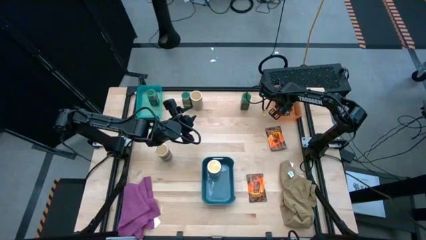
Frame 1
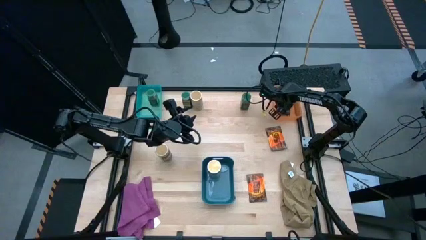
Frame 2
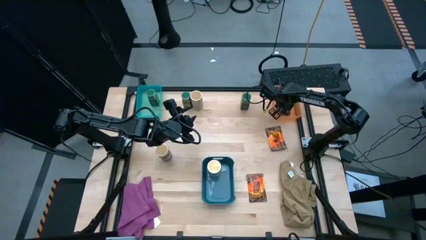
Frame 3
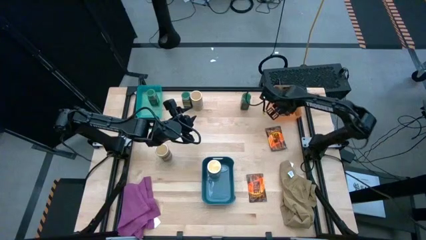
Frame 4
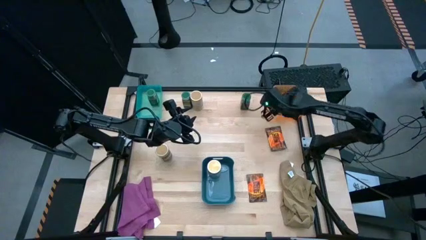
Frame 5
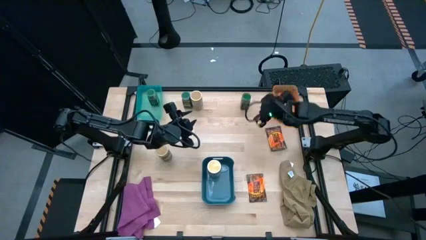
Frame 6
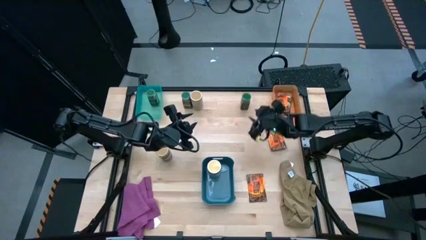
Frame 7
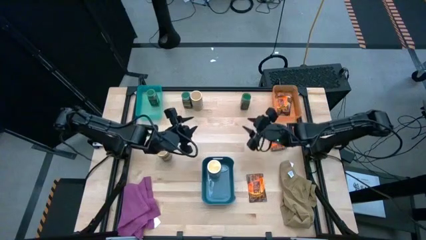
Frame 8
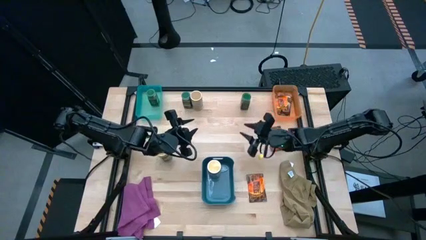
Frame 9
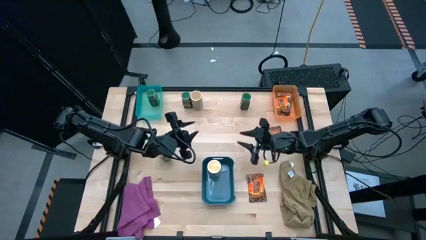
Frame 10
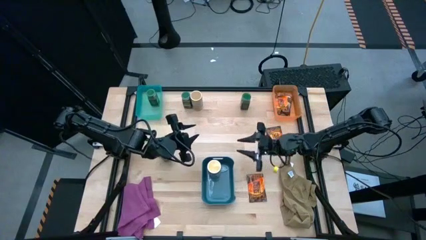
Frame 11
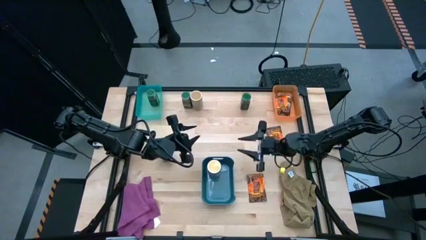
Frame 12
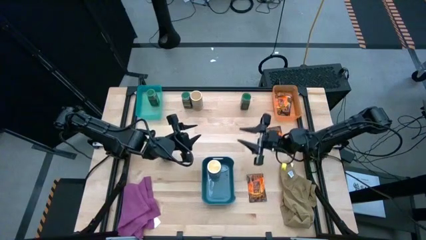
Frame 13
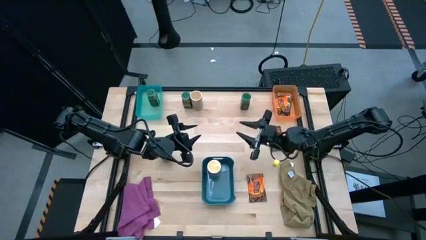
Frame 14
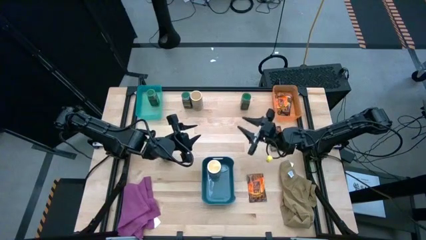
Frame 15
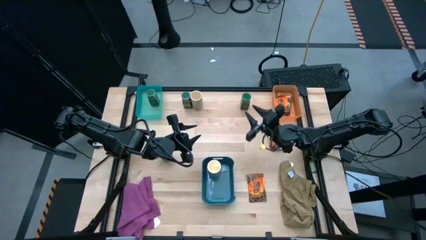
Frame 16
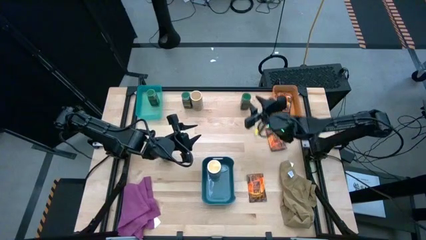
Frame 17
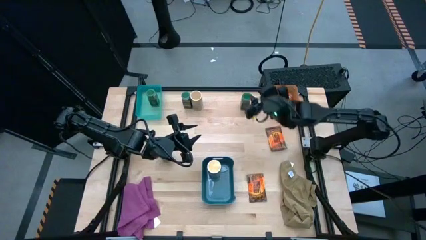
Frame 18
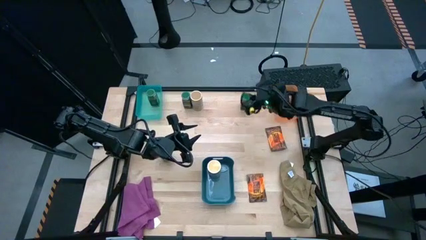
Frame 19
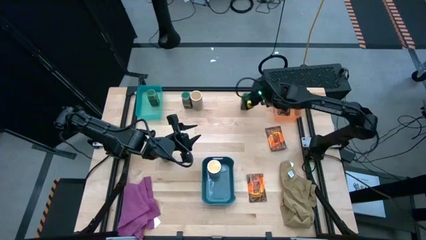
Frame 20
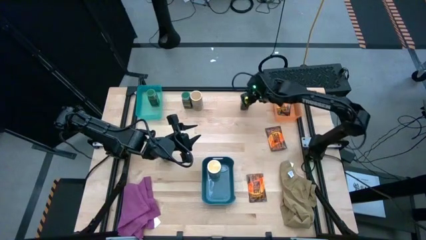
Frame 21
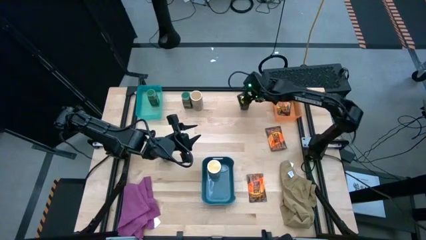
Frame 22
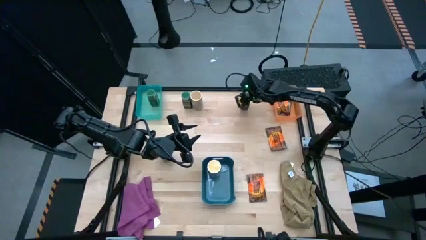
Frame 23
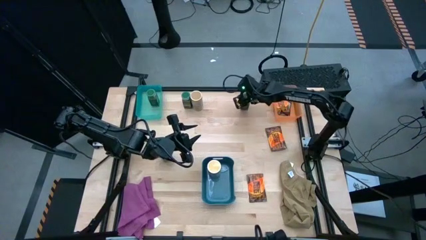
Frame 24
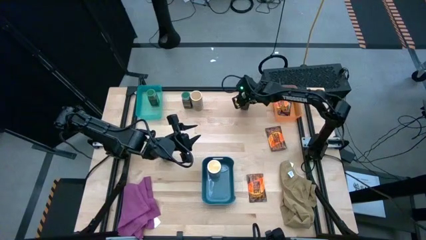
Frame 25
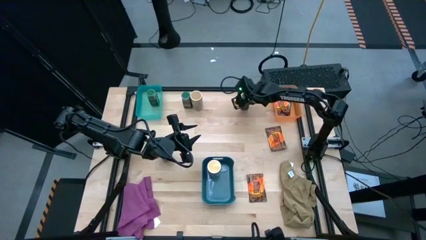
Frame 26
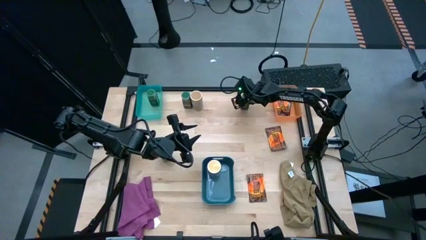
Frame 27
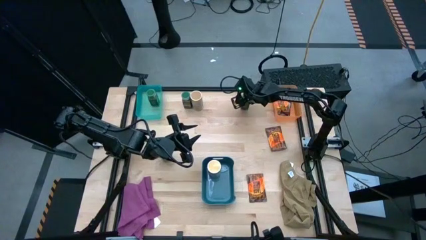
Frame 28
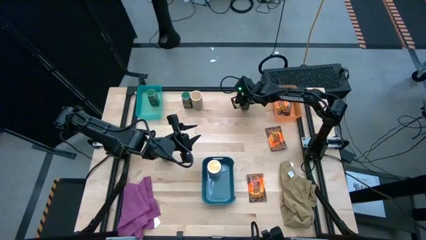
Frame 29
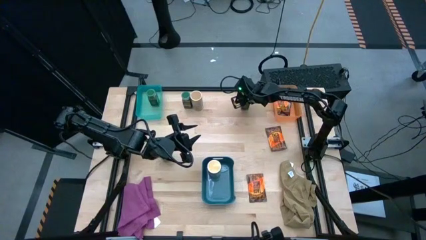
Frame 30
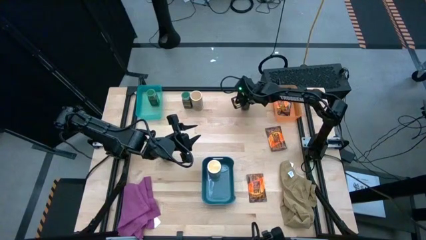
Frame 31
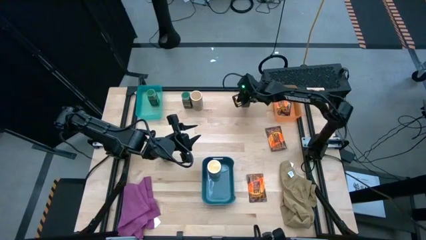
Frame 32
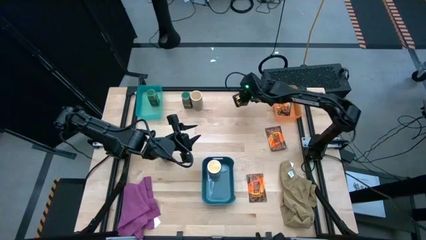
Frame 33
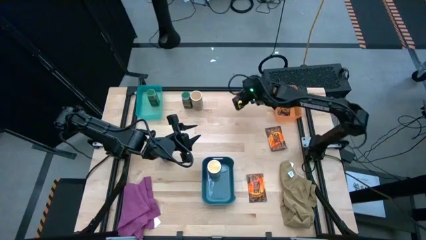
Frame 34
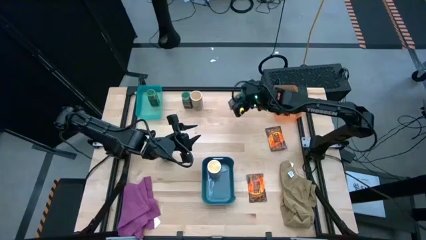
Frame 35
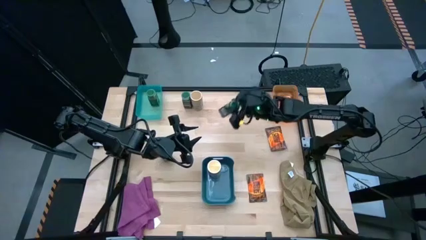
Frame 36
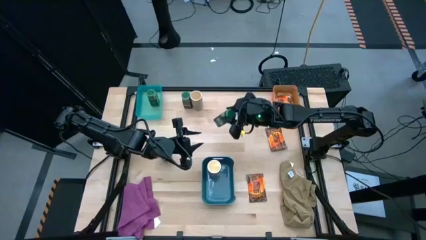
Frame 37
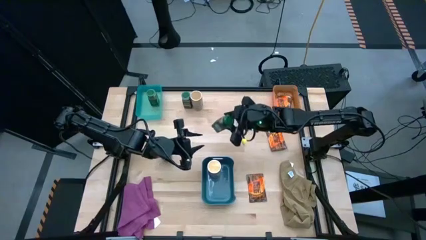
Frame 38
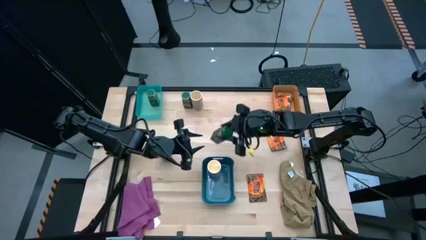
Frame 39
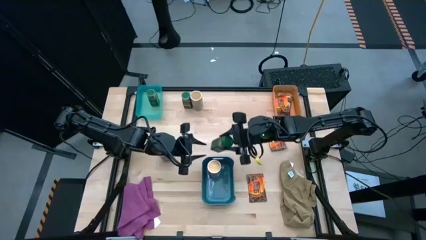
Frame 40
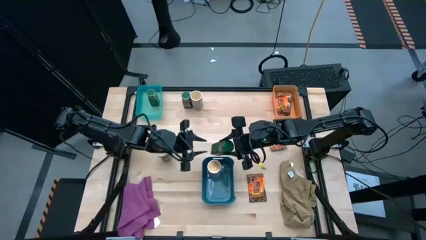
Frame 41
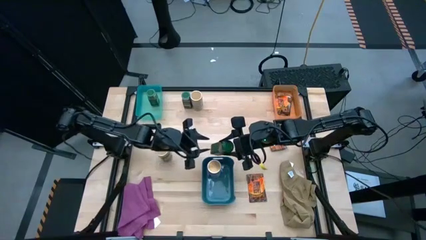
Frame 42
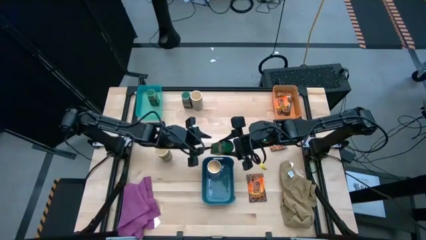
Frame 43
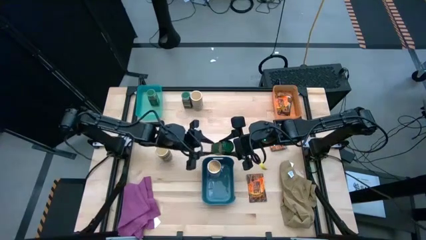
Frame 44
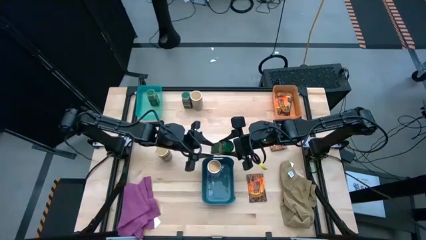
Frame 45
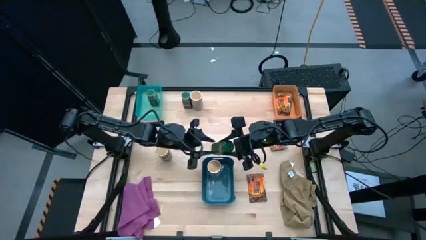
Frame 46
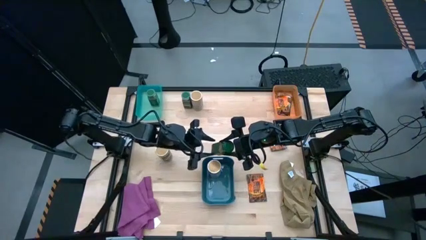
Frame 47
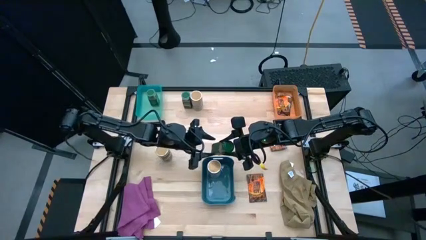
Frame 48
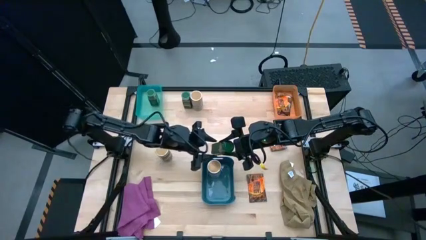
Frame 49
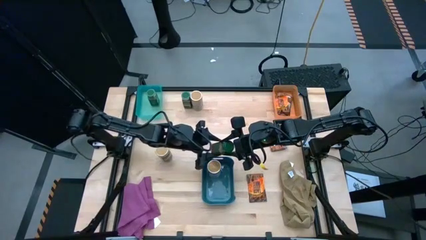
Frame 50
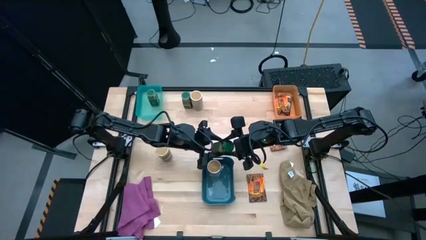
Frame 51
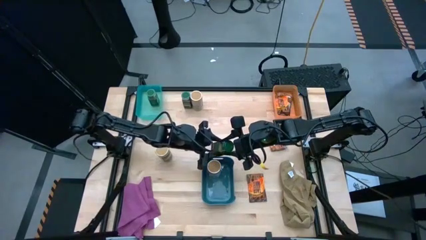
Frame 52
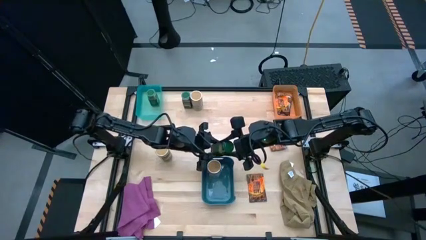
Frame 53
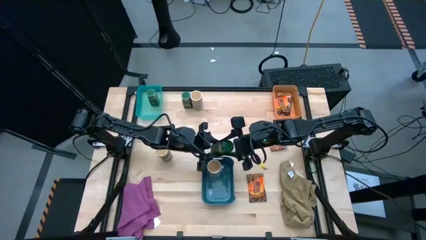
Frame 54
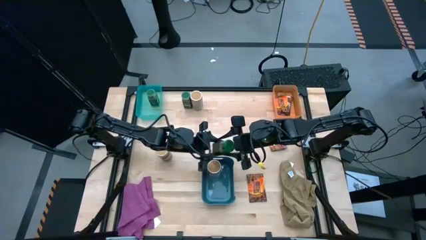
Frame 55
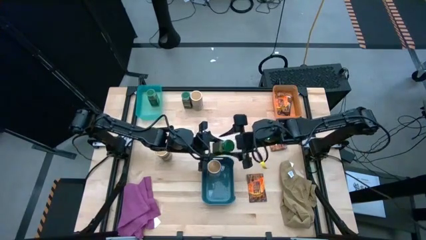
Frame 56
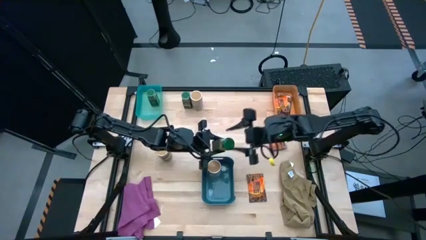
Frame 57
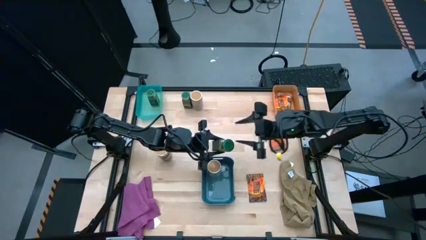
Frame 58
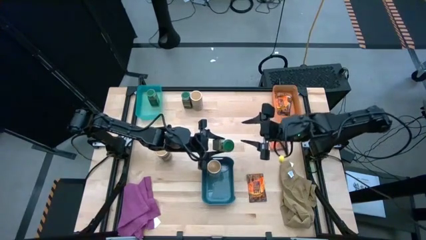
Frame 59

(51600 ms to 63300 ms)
Task: Sort spices by type
Put the green seasoning bottle into the light blue bin

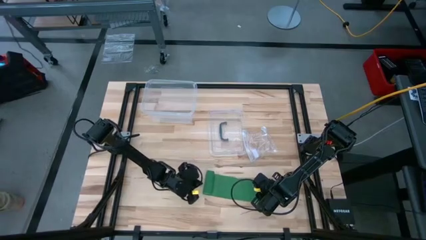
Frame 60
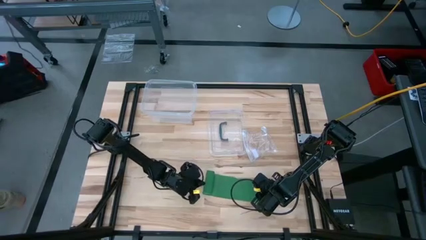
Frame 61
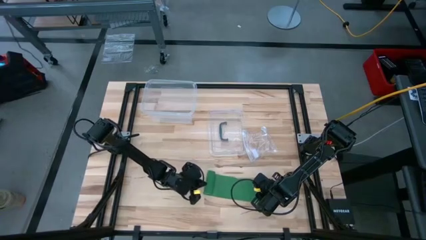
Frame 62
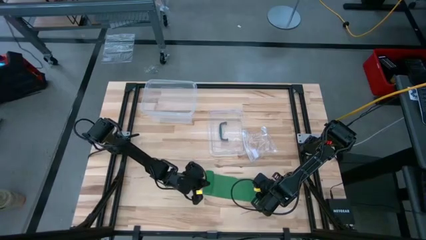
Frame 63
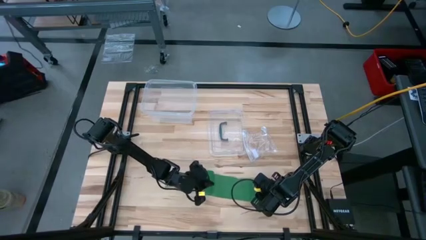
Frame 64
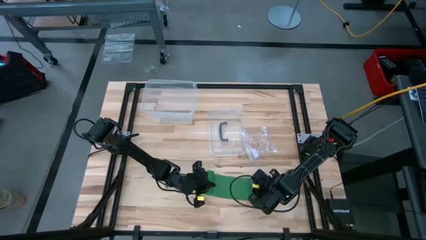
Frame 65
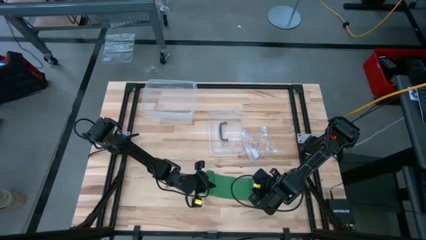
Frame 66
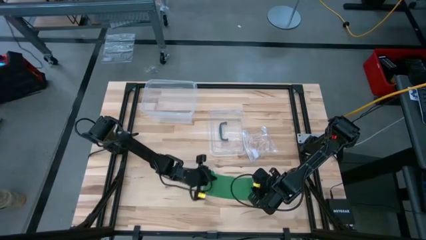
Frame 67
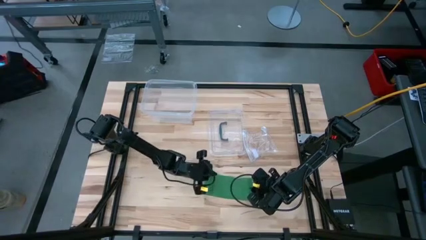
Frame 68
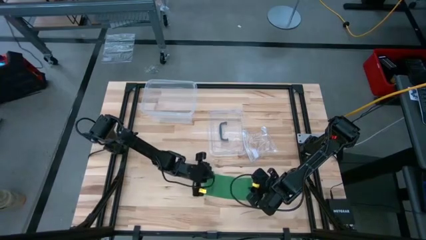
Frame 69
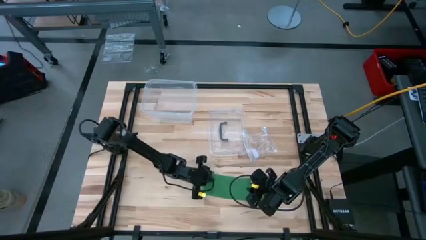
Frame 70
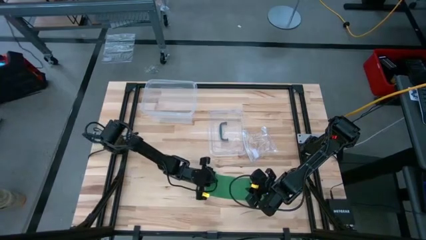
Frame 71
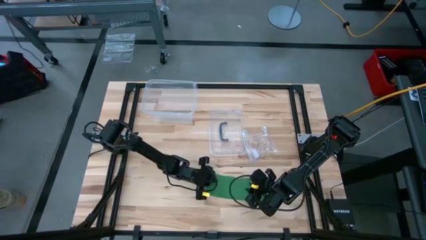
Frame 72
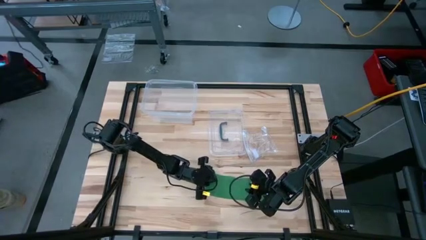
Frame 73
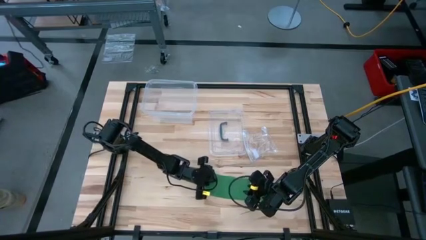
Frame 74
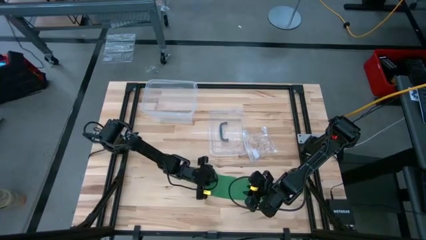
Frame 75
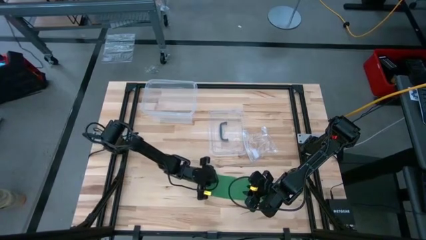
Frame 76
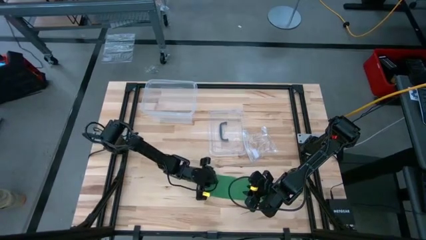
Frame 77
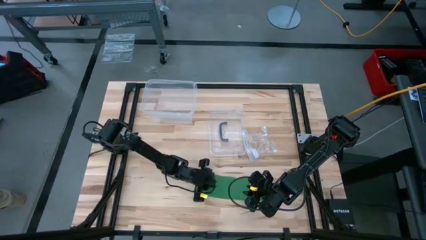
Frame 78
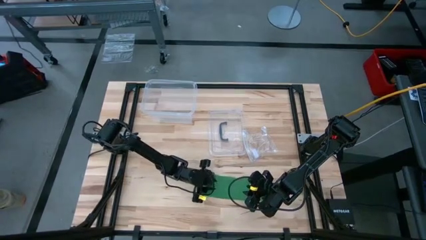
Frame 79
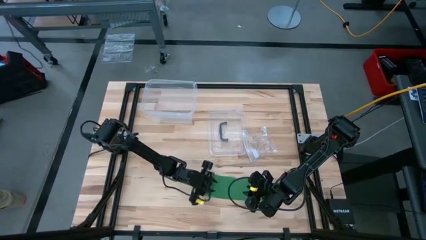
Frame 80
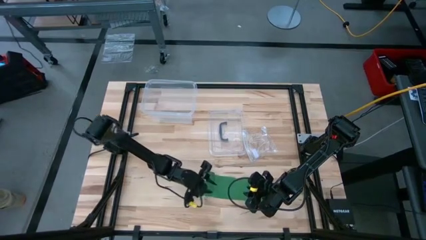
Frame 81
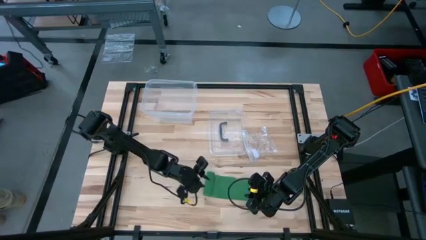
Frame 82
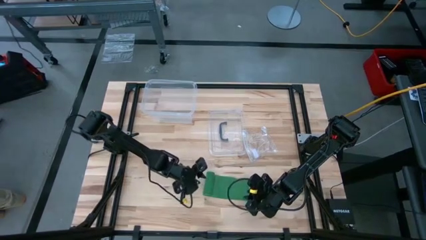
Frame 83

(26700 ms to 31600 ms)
Task: Roll bandage
Roll the green bandage
